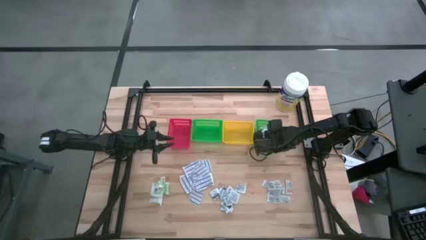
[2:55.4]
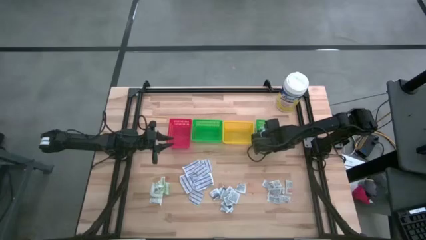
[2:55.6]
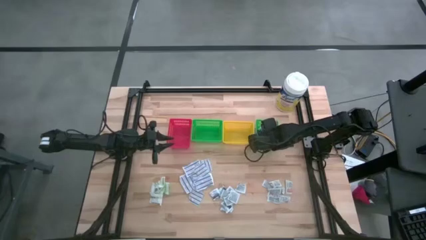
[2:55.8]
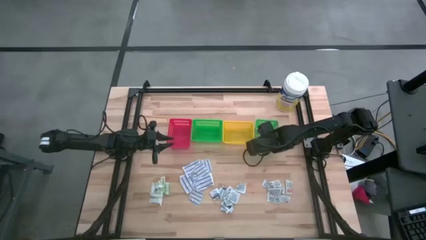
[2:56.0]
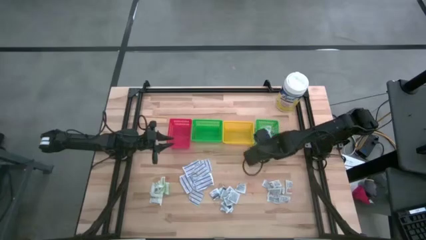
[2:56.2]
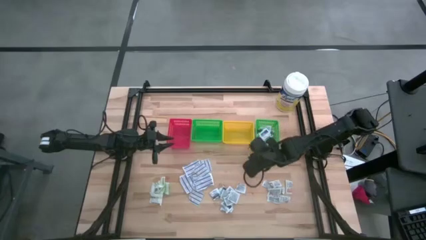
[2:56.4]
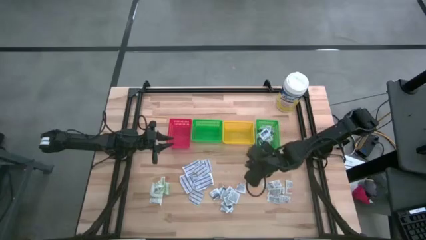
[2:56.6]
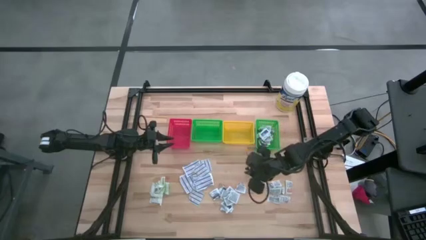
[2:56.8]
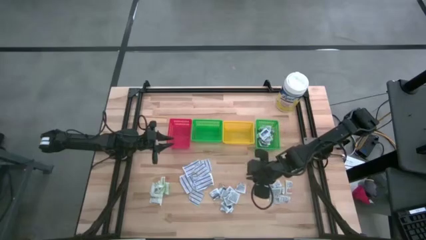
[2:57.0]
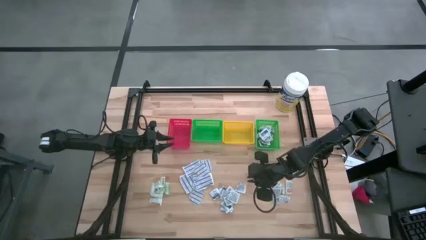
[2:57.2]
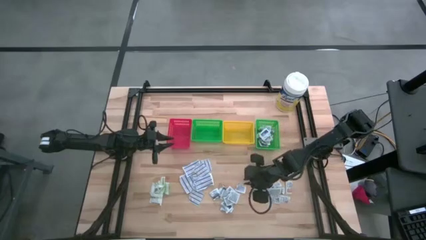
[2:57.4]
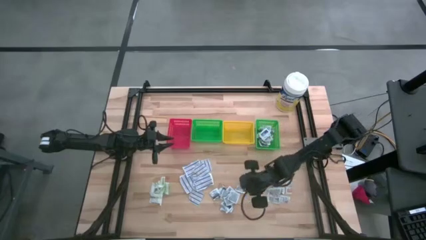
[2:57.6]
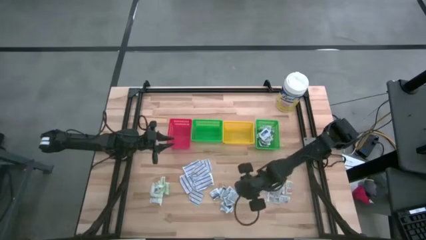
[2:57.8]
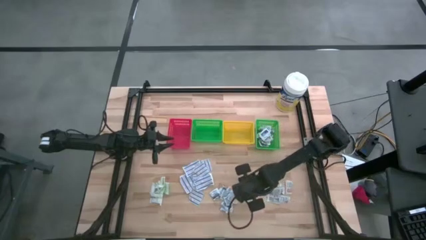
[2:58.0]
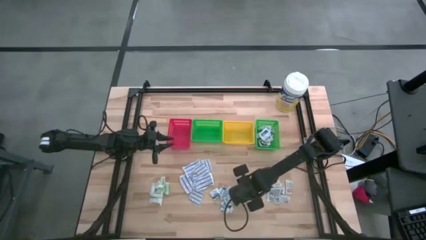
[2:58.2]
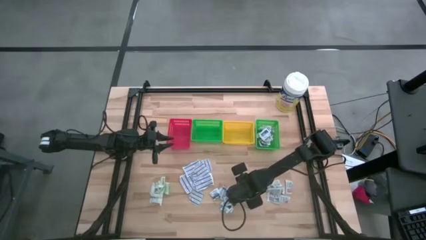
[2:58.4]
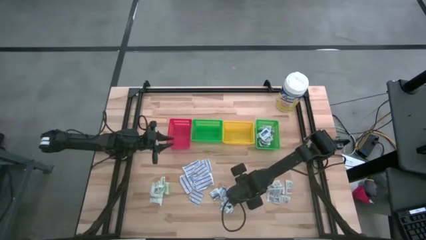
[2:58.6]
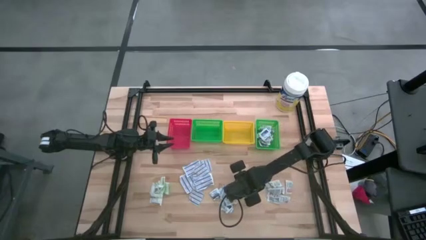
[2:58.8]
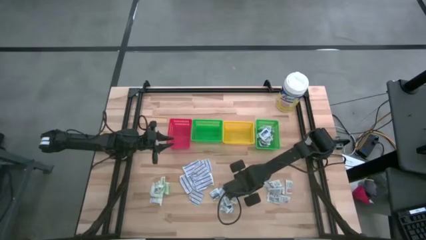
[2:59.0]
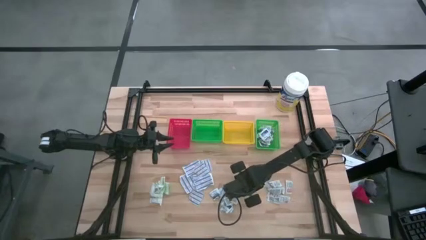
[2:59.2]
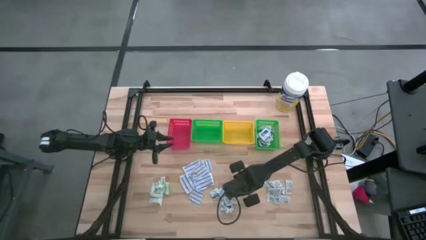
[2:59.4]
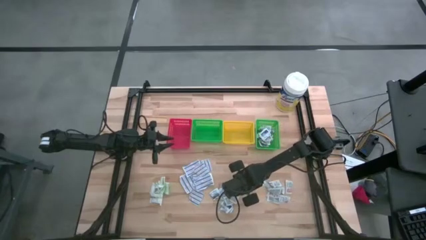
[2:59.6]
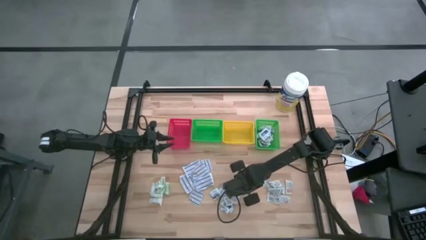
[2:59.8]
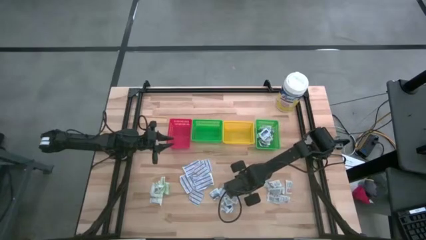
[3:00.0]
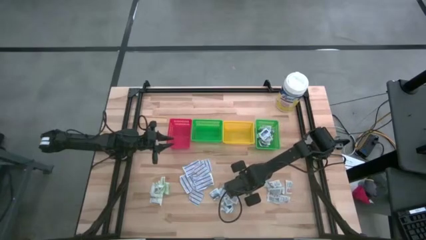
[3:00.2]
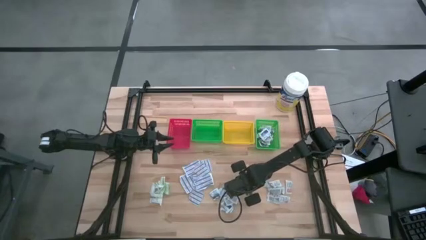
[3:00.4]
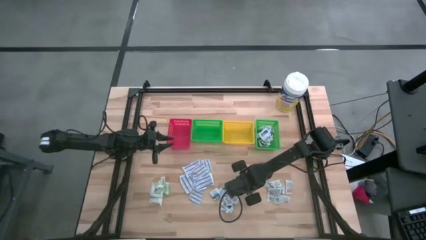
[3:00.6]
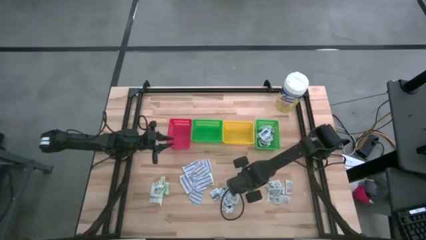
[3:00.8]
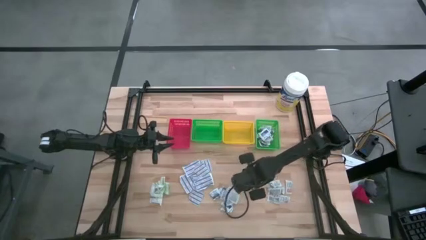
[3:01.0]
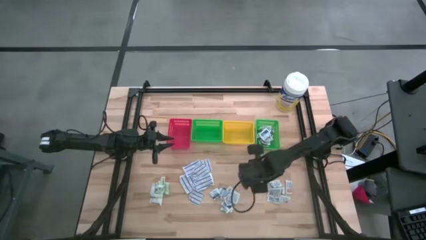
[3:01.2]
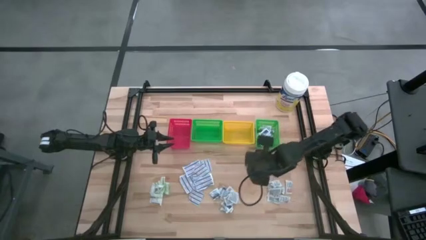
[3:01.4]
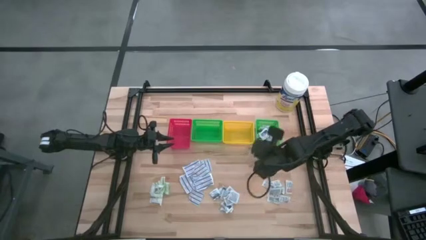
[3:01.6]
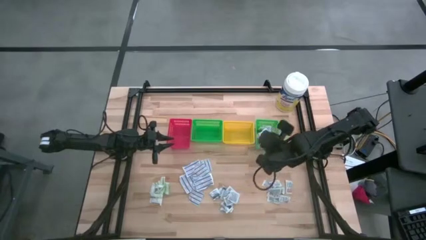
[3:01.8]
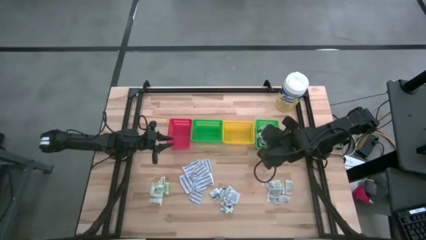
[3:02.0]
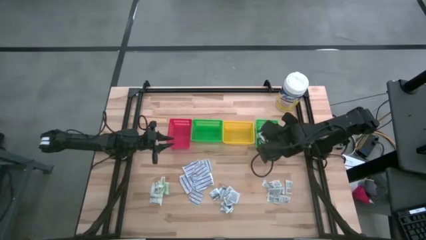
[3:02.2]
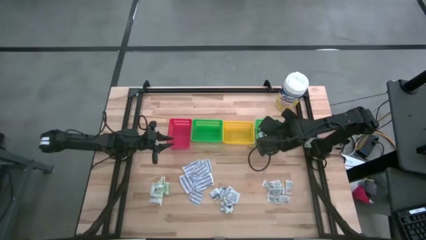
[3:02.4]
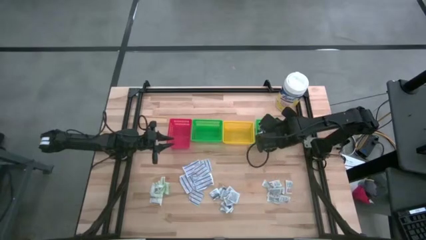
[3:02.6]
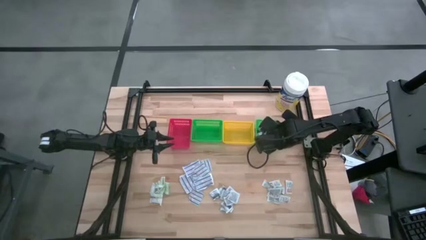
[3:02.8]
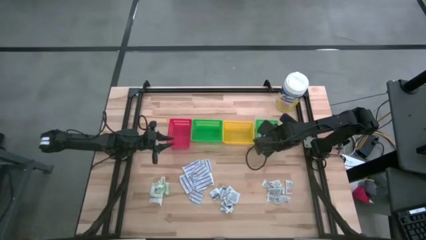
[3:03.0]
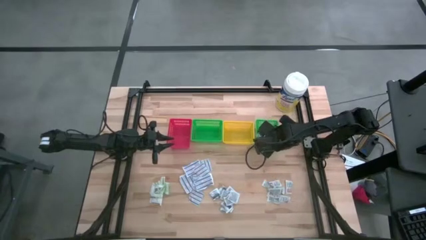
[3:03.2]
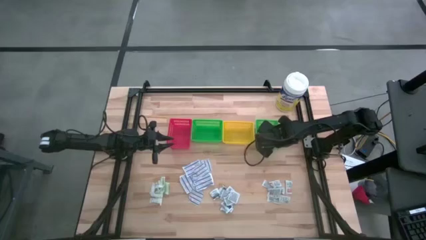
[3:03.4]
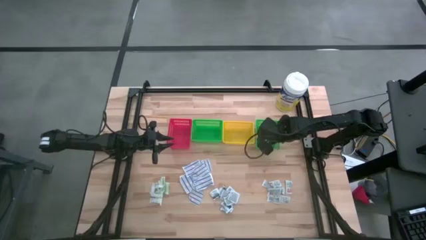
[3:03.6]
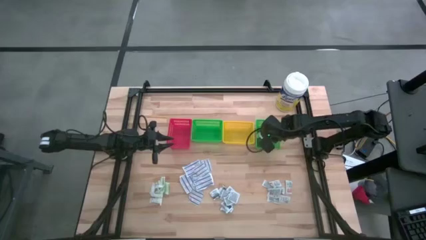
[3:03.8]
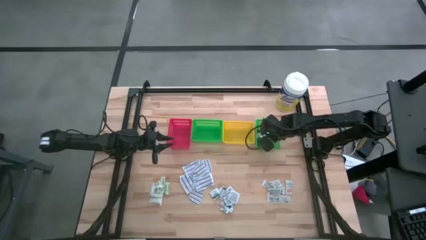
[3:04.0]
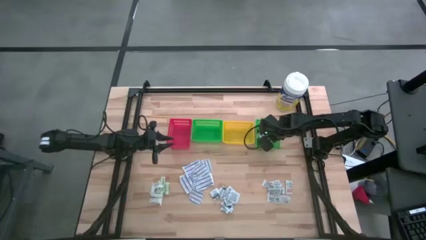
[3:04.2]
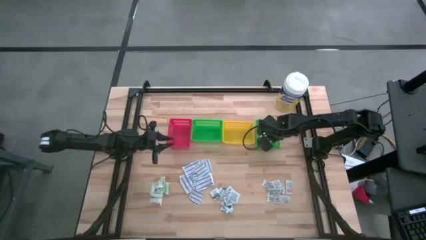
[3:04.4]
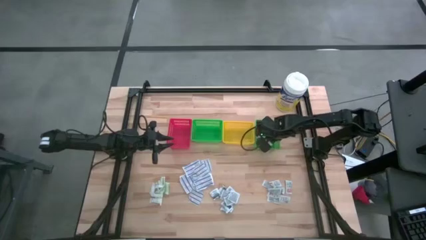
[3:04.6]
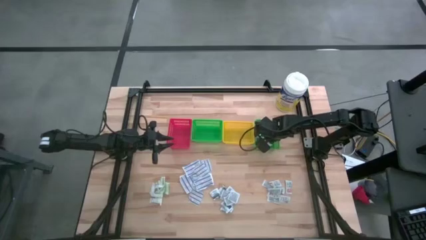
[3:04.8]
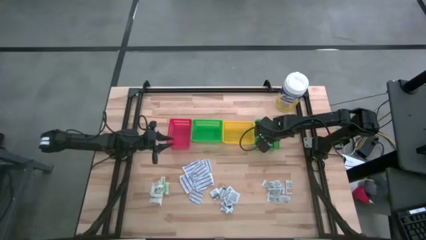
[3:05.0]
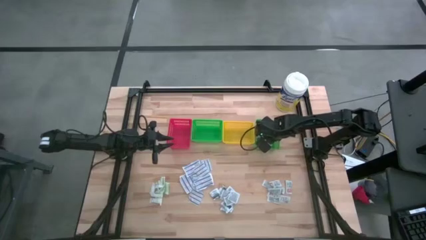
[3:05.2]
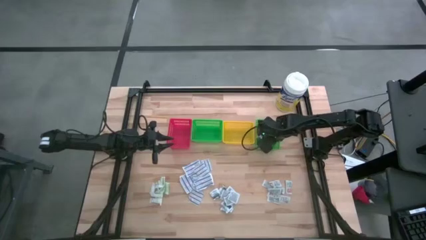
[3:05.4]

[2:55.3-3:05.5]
Task: Pick & Place First Aid Supplies
Put the blue alcohol pad into the right green bin

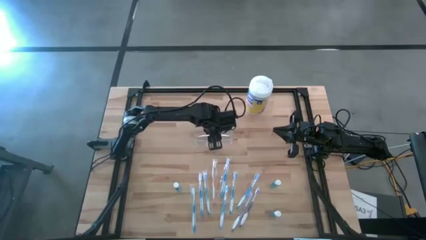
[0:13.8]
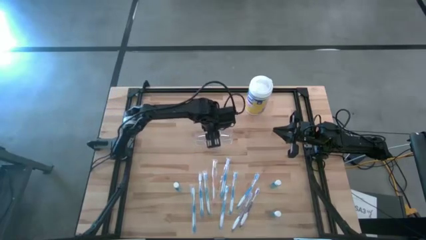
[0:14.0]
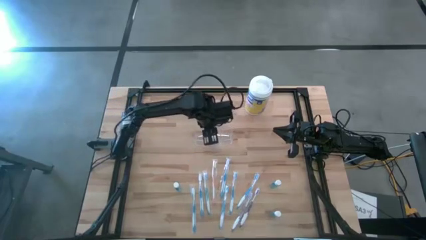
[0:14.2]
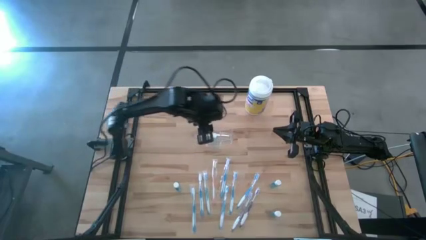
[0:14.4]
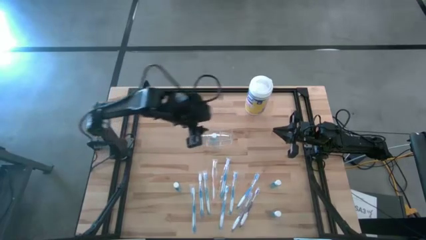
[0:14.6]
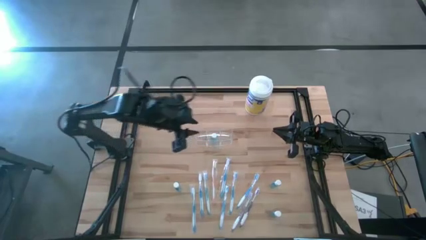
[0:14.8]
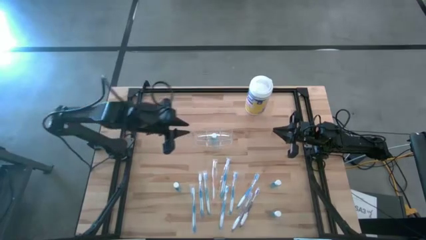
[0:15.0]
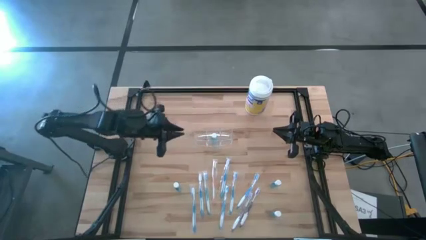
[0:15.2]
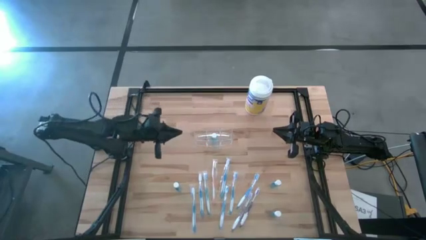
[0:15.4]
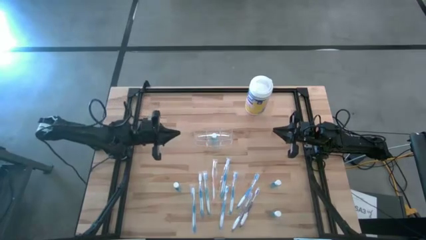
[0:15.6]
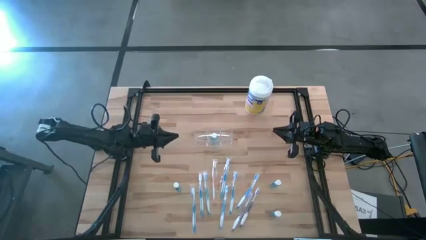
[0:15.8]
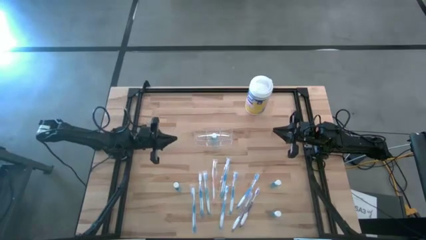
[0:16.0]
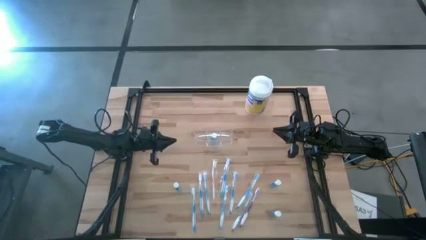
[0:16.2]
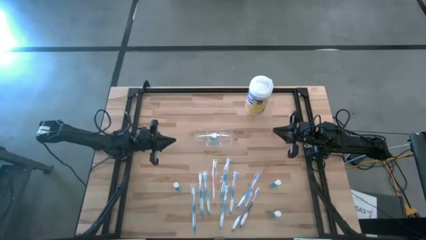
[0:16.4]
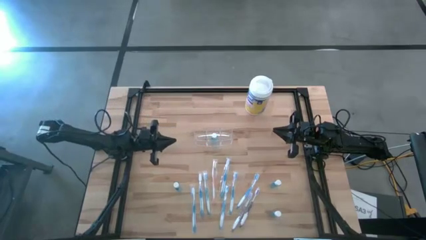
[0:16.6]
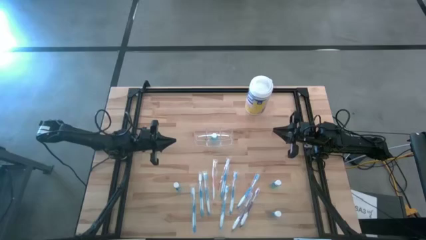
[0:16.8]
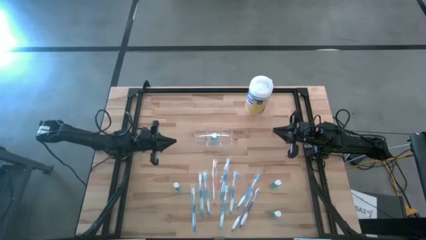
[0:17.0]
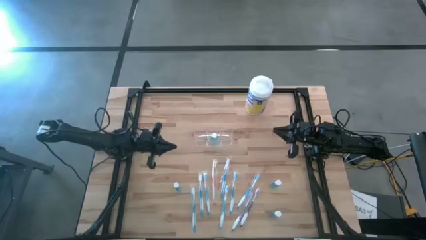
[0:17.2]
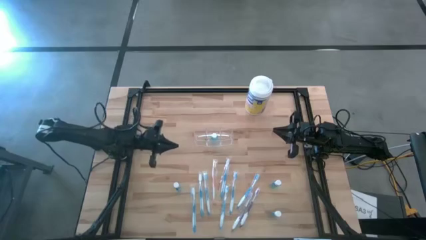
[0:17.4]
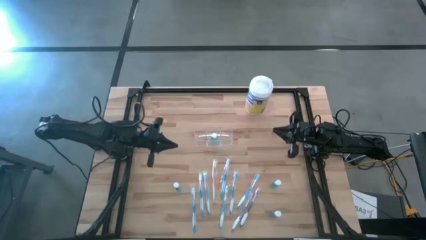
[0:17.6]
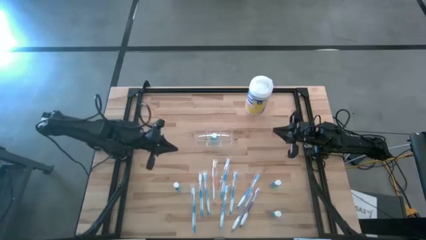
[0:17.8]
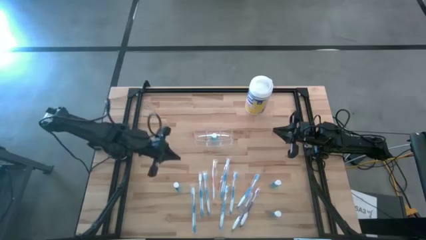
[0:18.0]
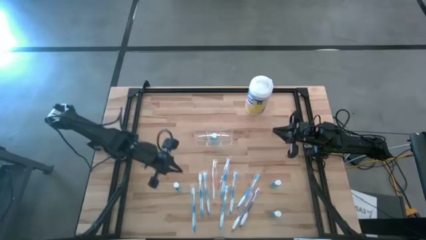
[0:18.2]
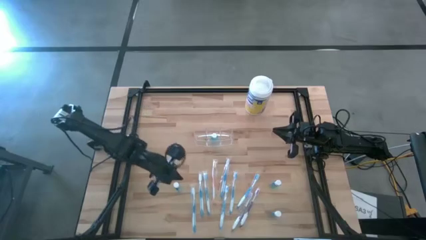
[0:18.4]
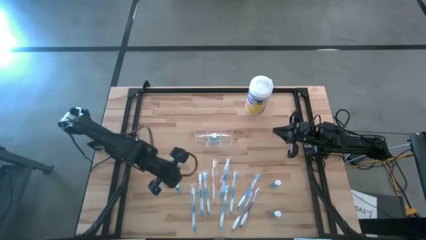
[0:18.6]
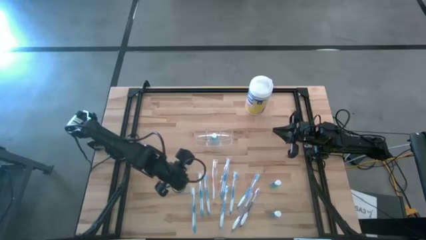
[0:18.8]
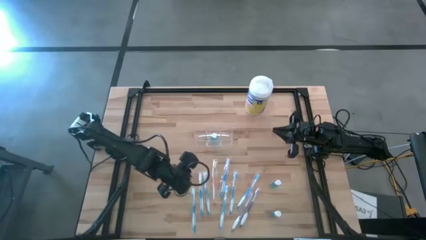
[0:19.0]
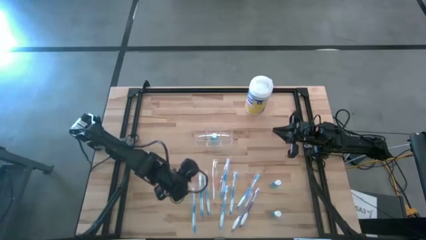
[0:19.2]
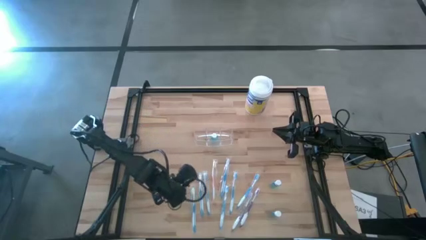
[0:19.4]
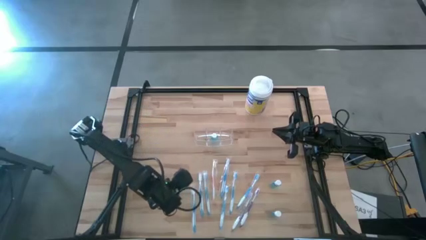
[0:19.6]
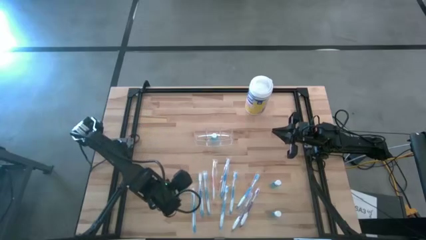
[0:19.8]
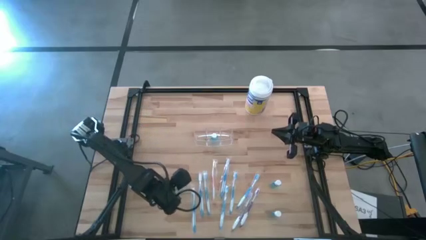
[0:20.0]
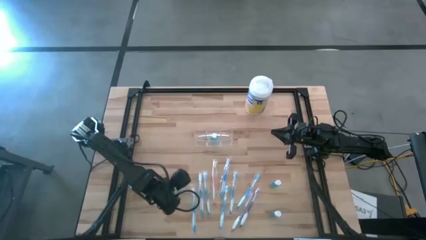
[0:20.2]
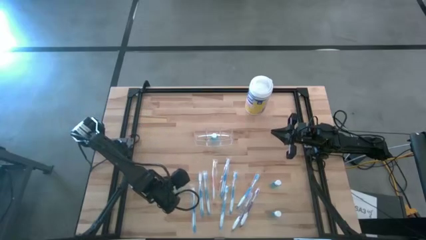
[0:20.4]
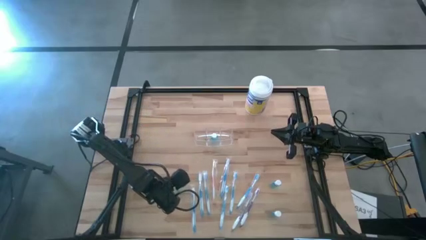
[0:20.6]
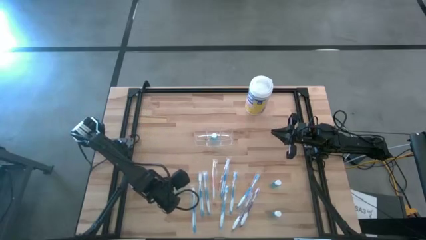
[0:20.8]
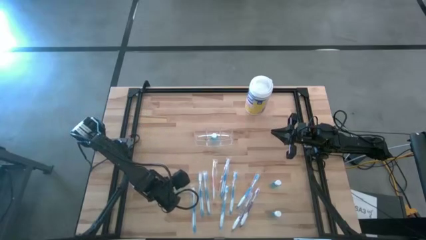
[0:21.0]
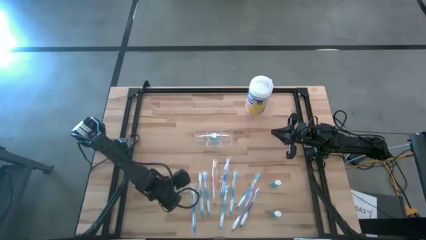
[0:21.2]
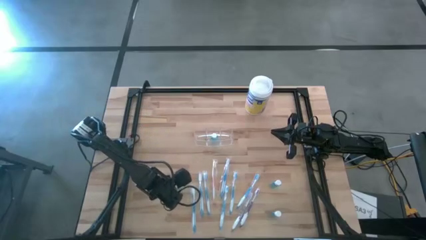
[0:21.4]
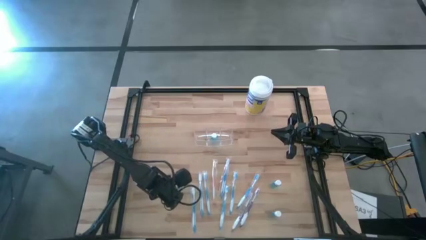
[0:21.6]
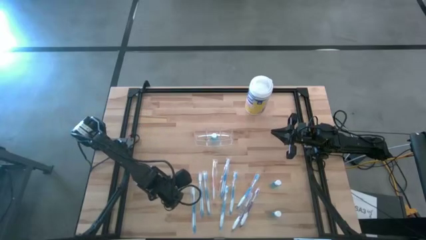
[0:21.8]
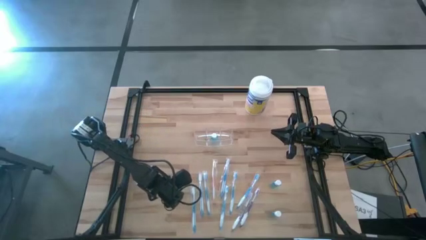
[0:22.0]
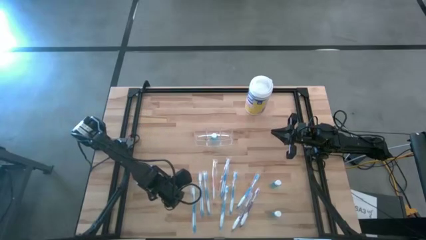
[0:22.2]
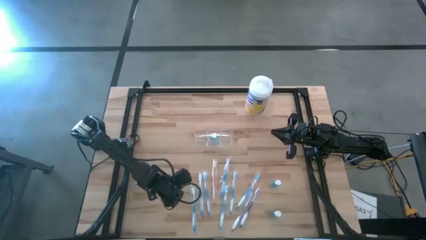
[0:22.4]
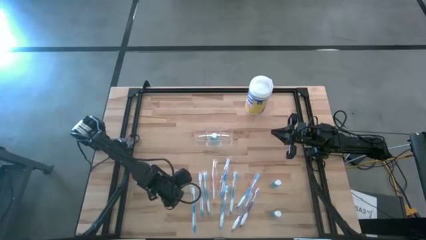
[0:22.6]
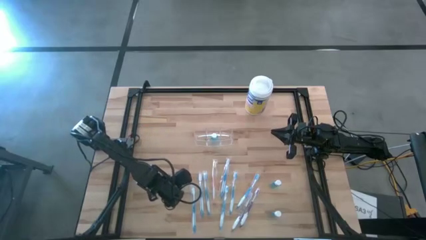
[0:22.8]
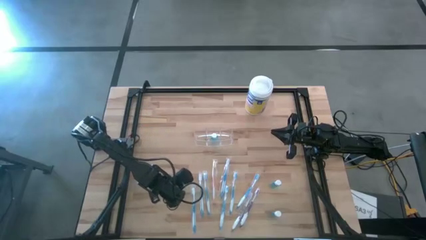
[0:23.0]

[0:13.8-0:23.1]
Task: Pick & Place toothbrushing station
Put the blue mouthwash into the transparent organizer
